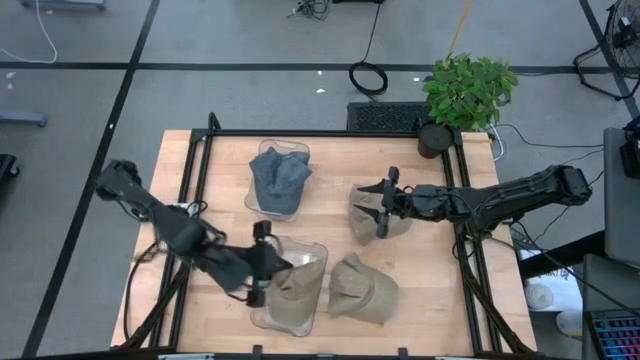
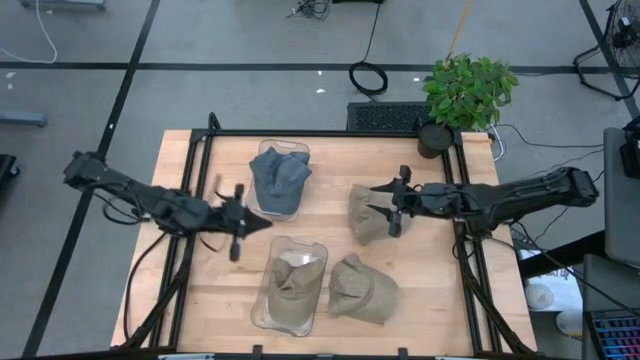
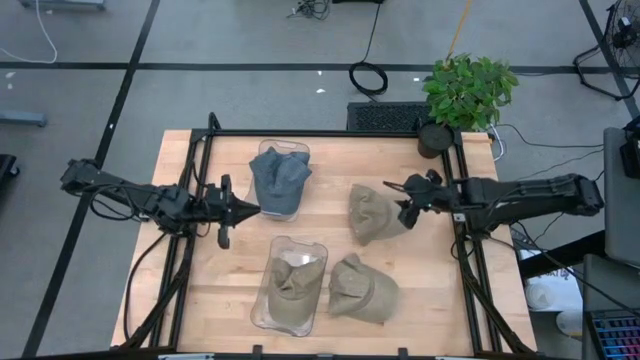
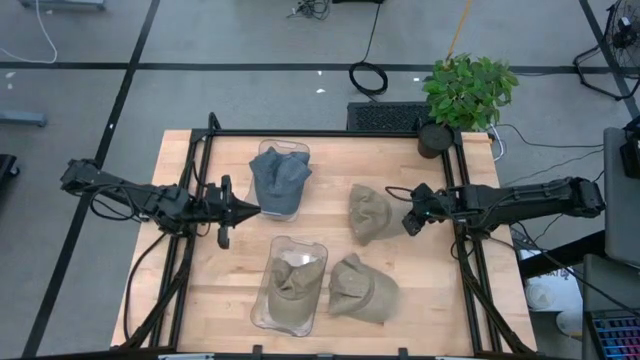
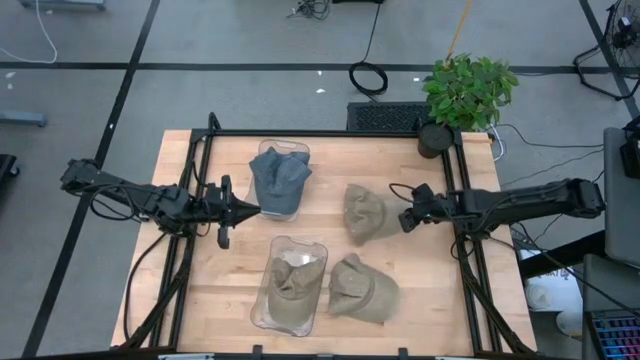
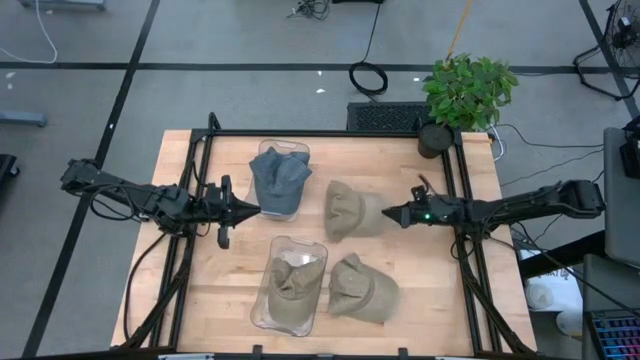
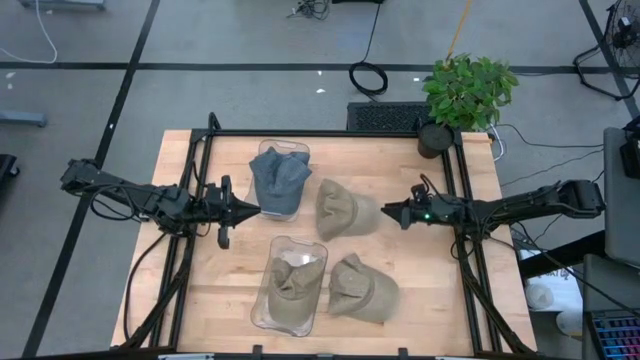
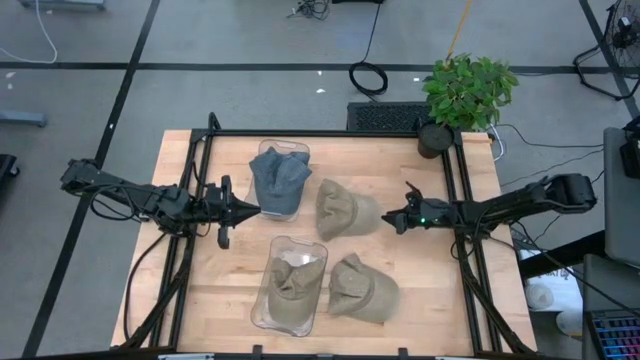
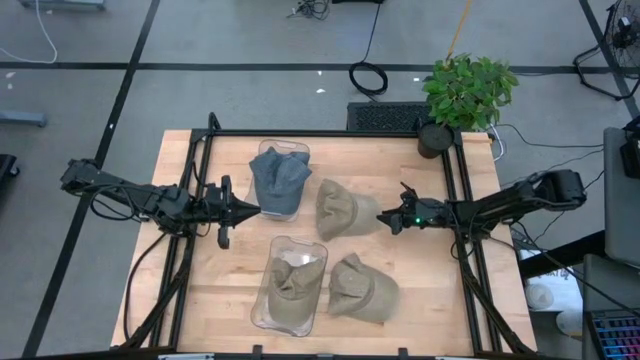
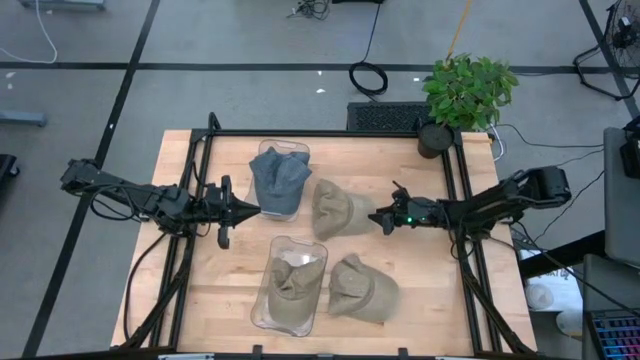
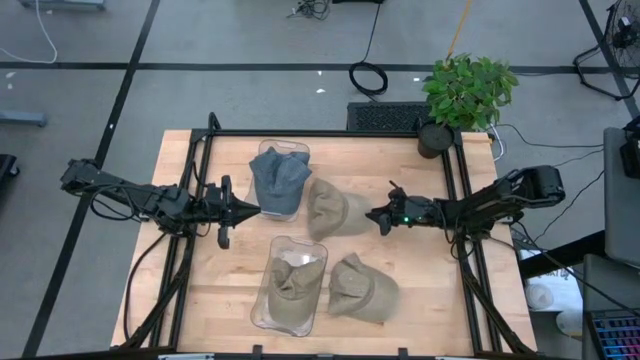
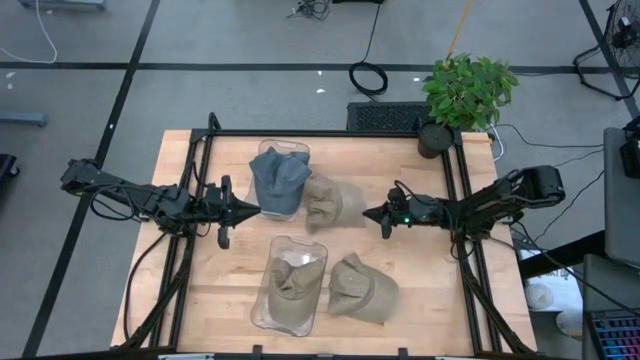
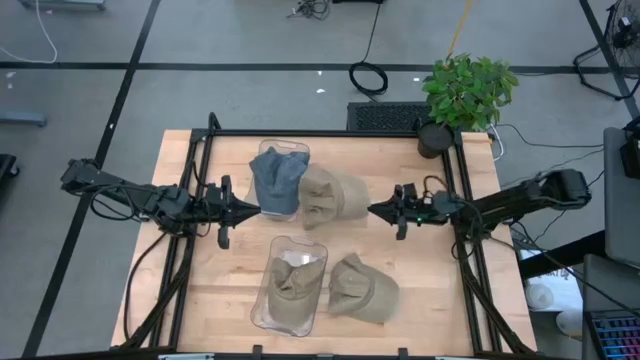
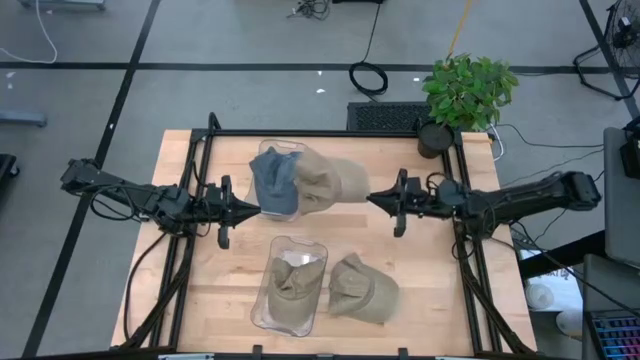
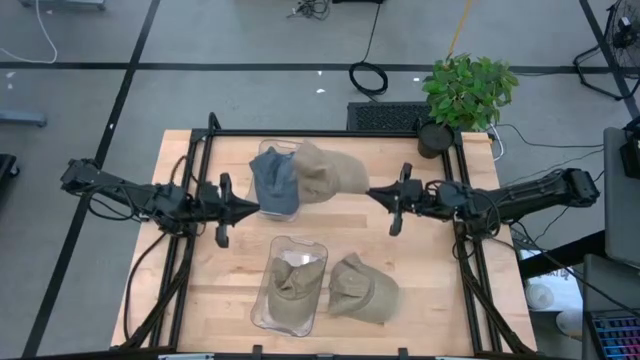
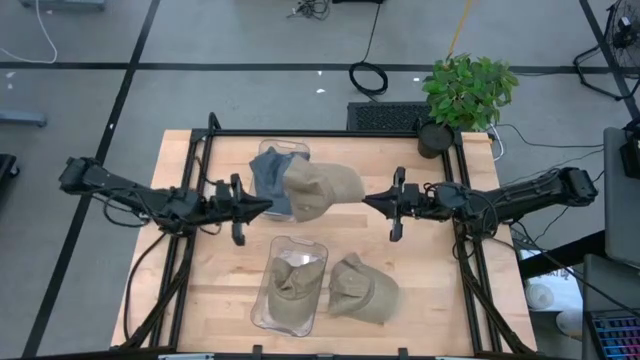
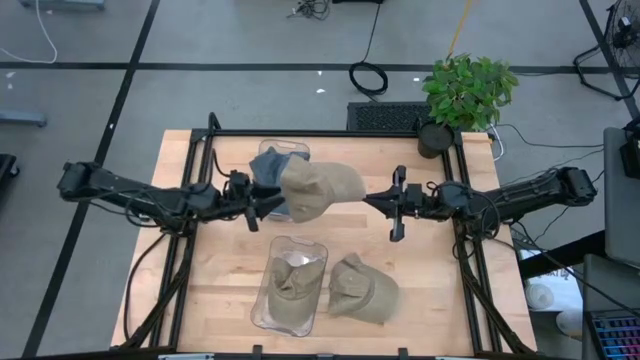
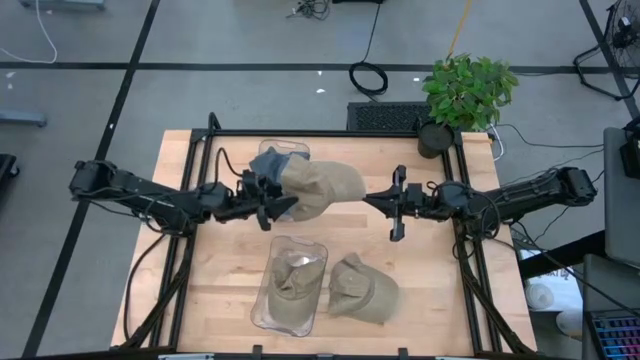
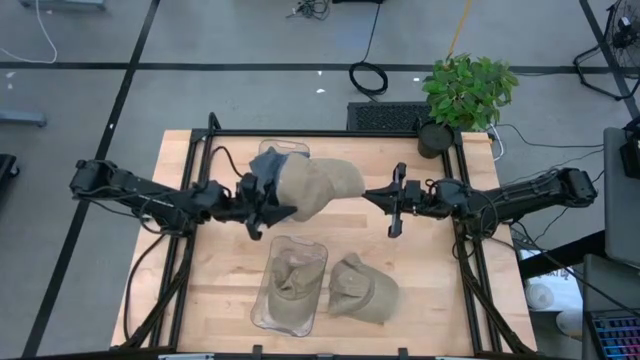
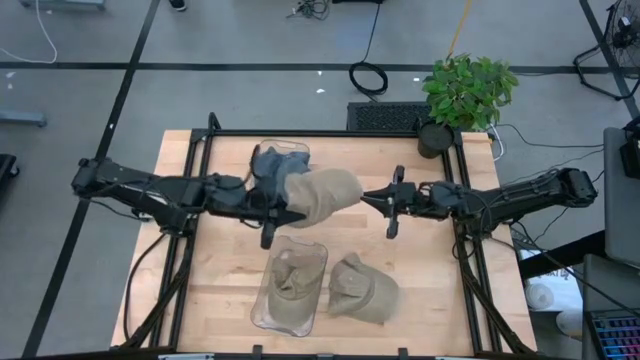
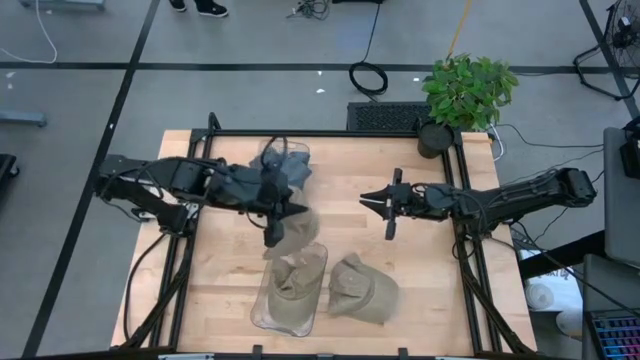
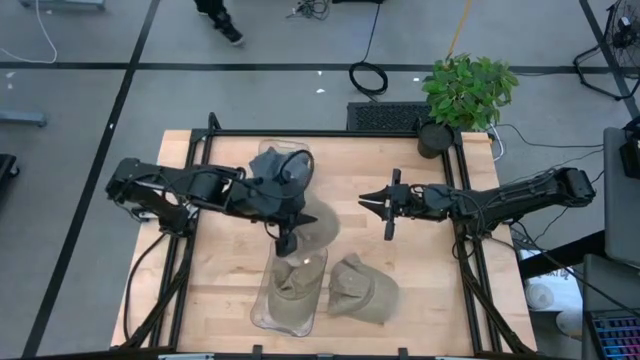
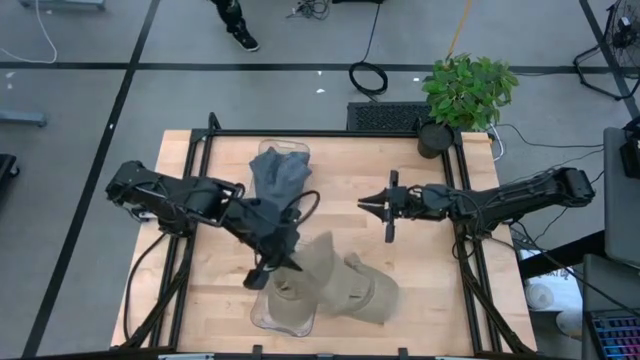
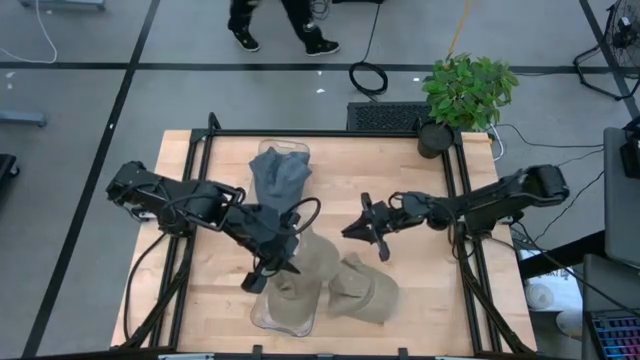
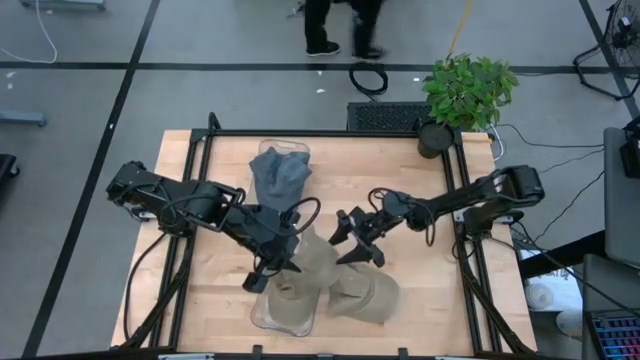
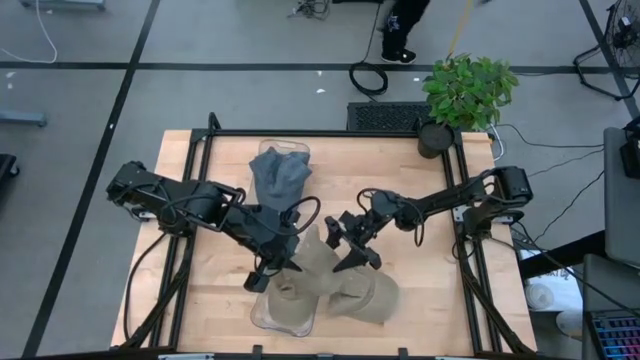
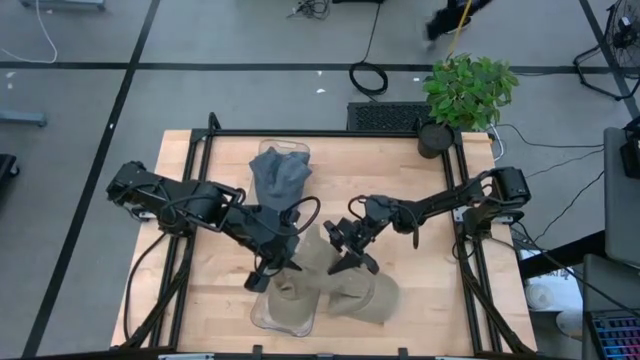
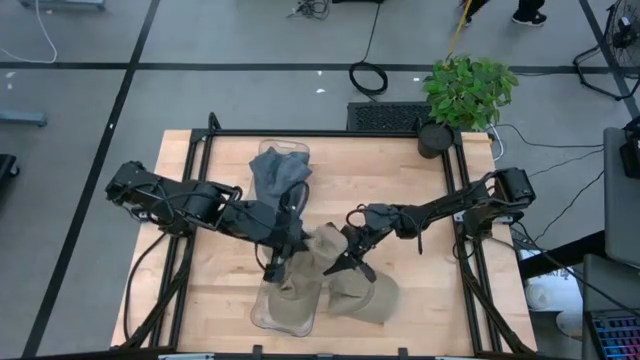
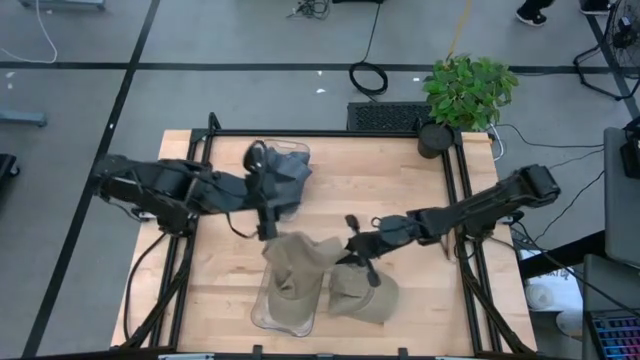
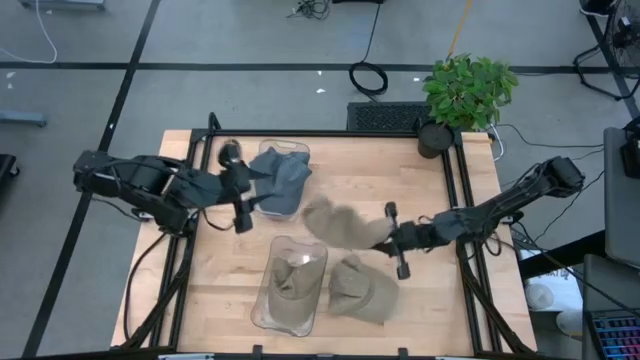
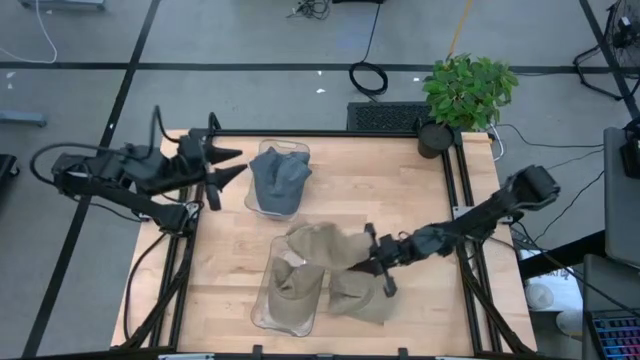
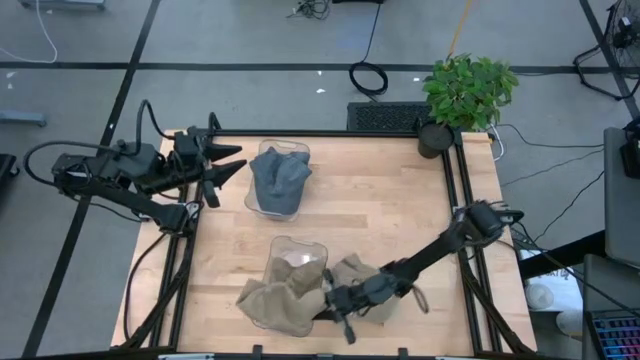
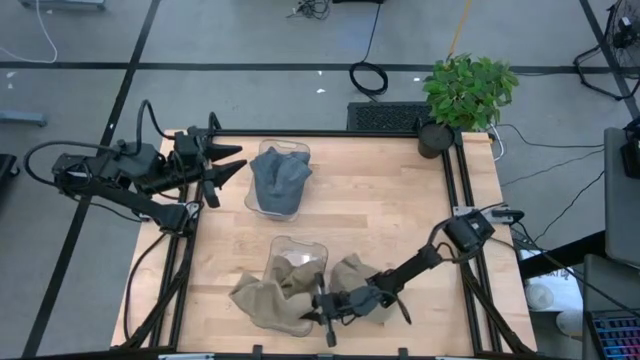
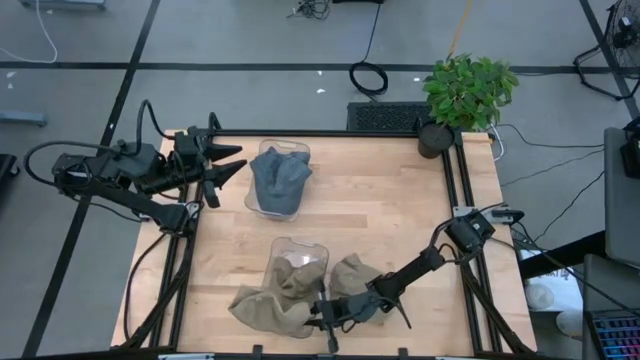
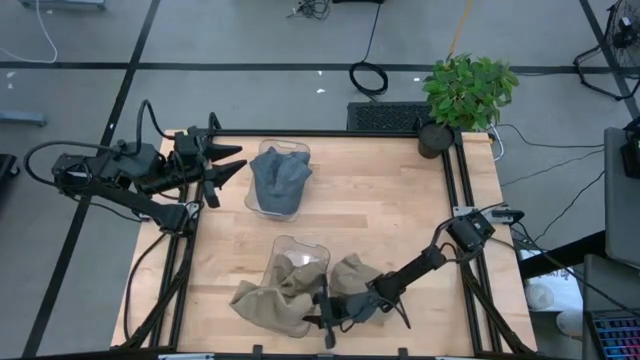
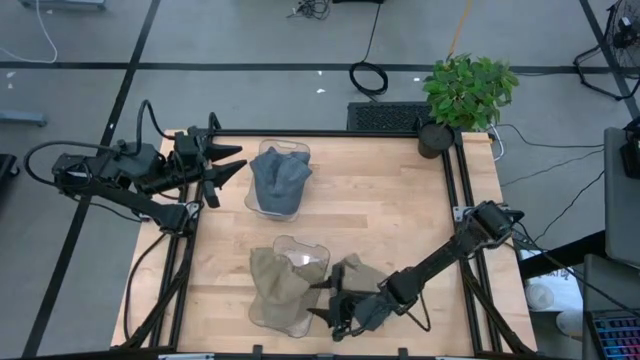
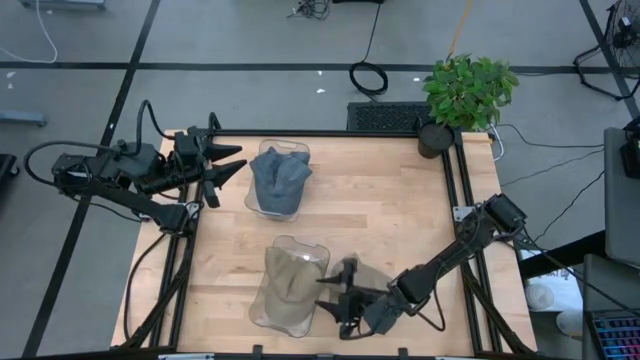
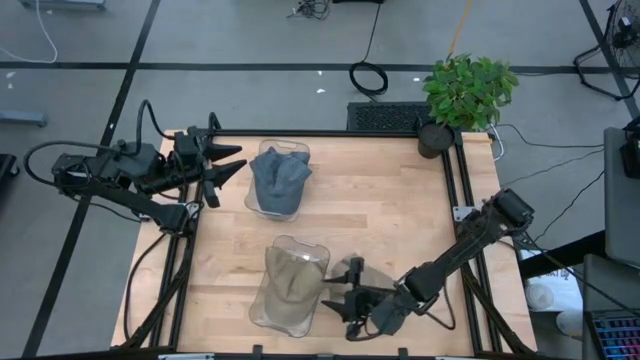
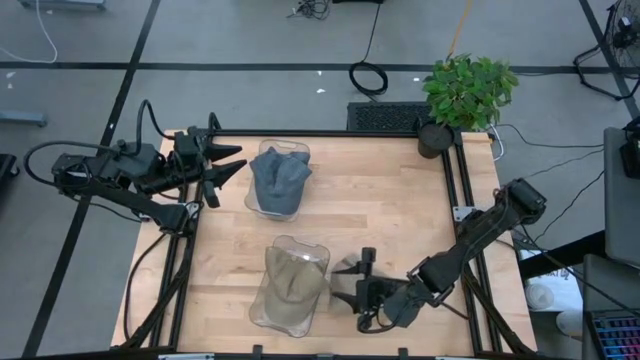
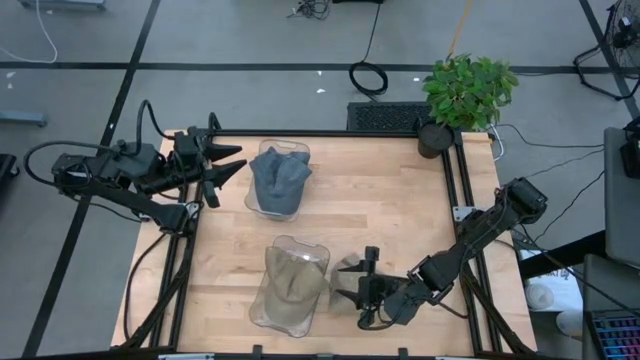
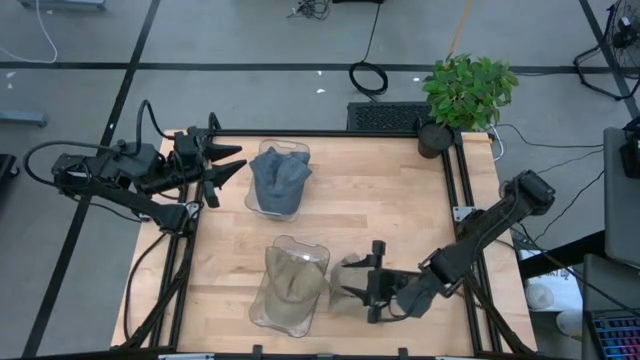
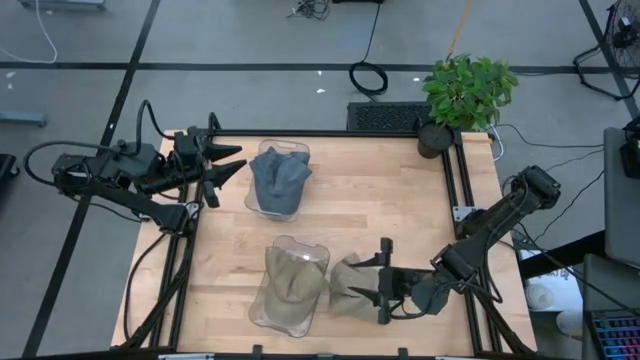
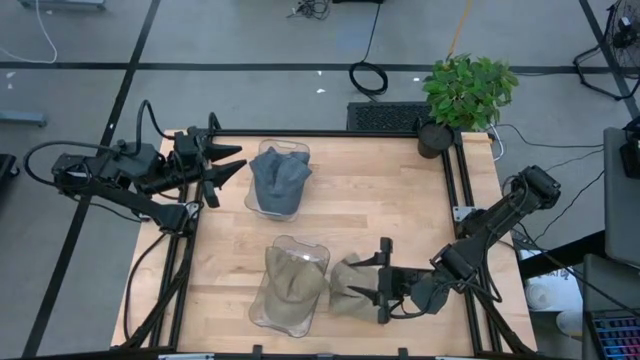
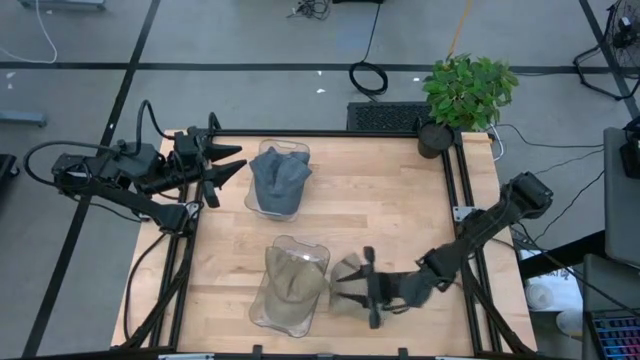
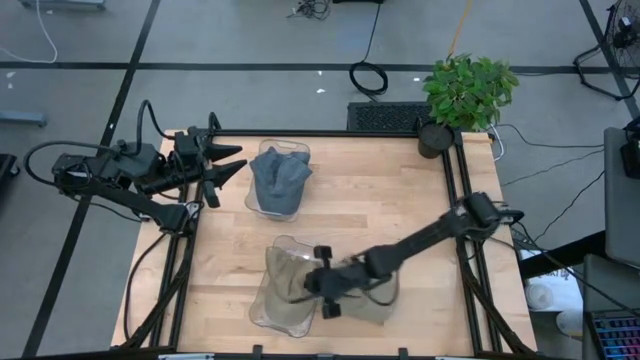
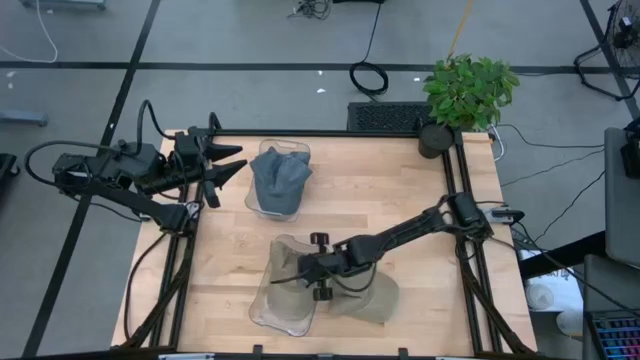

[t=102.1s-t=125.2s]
Task: Stack caps by color
Stack the top brown cap on the other brown cap in the bottom transparent bin
